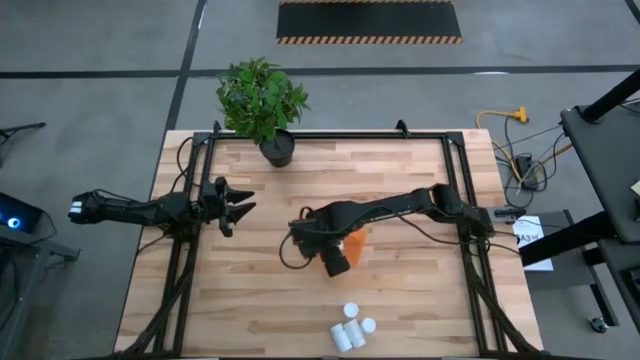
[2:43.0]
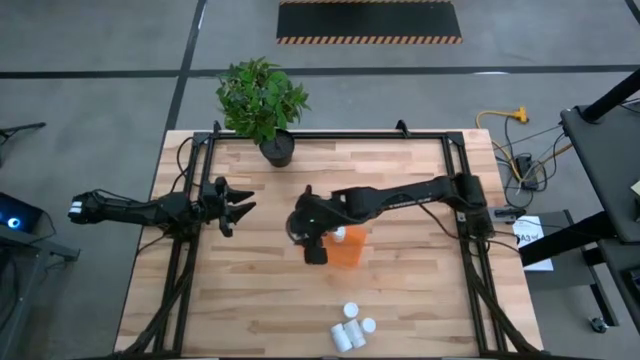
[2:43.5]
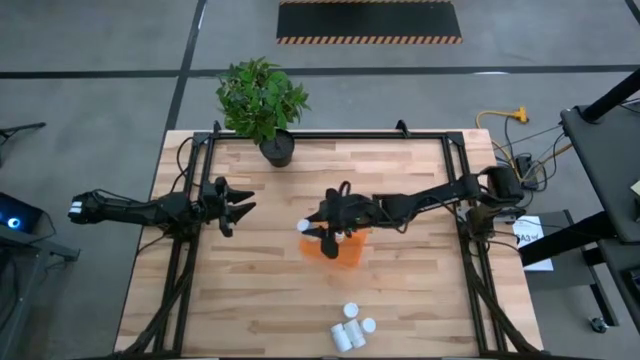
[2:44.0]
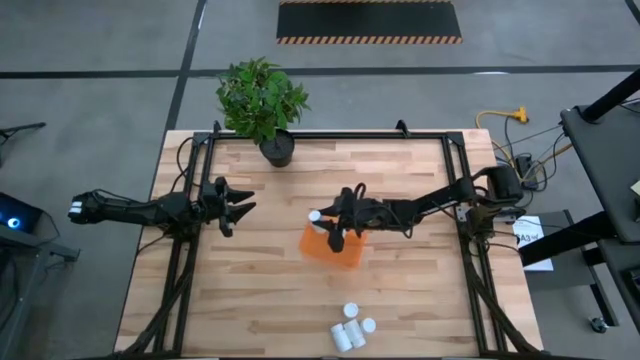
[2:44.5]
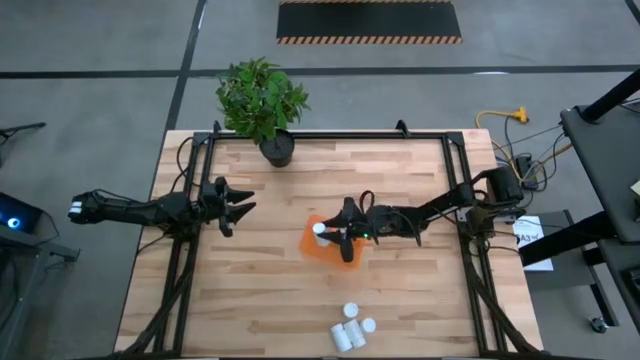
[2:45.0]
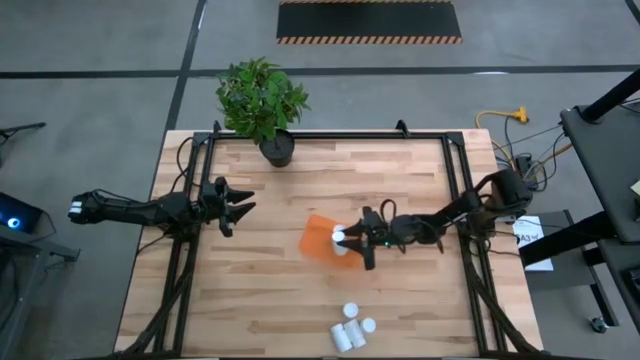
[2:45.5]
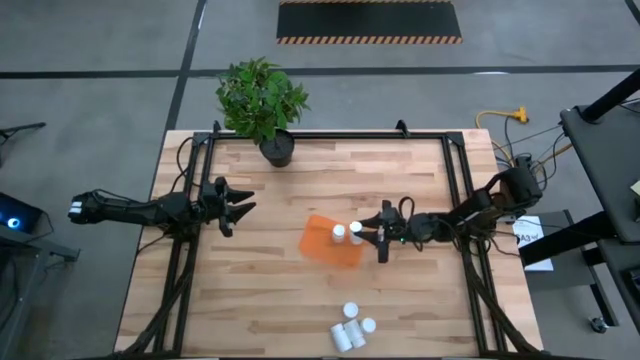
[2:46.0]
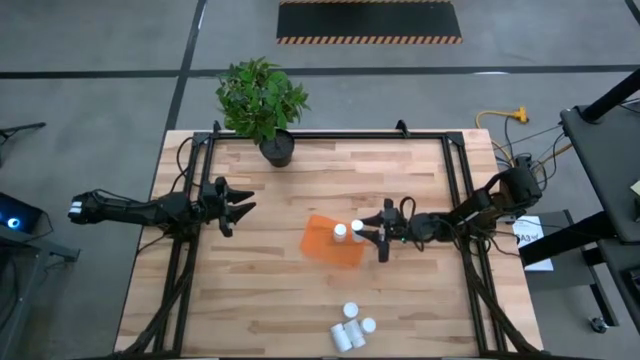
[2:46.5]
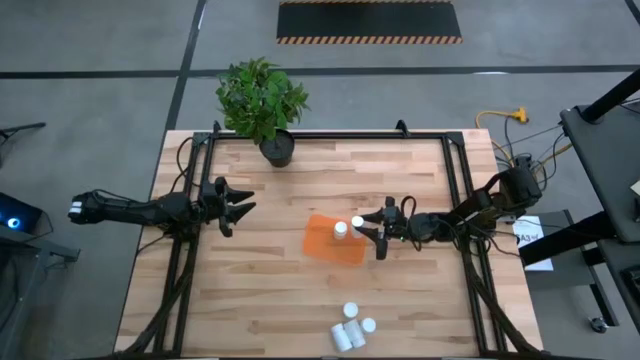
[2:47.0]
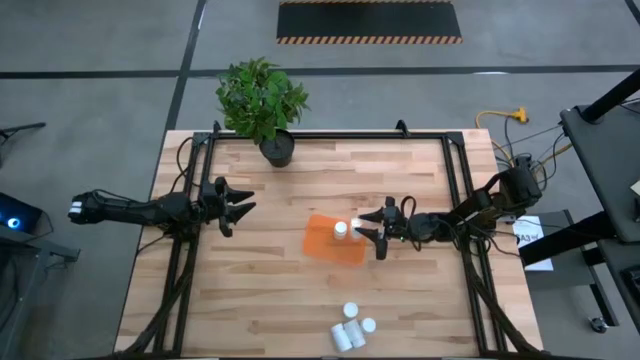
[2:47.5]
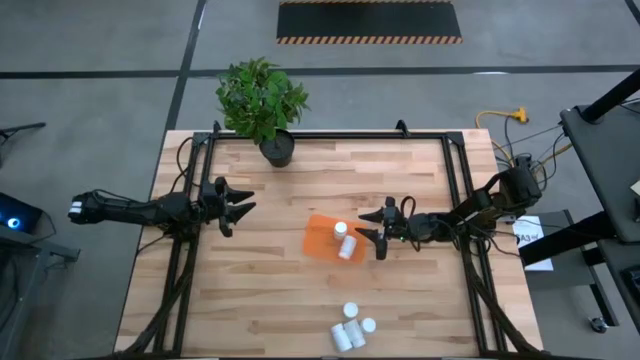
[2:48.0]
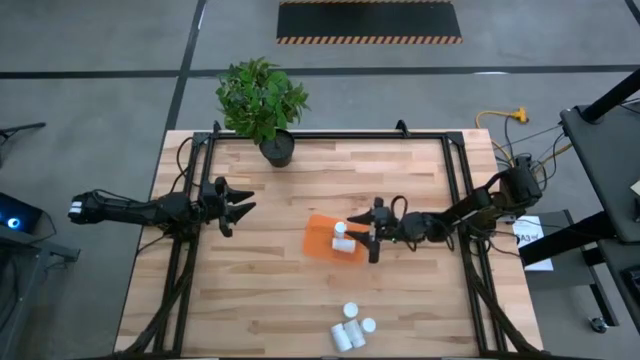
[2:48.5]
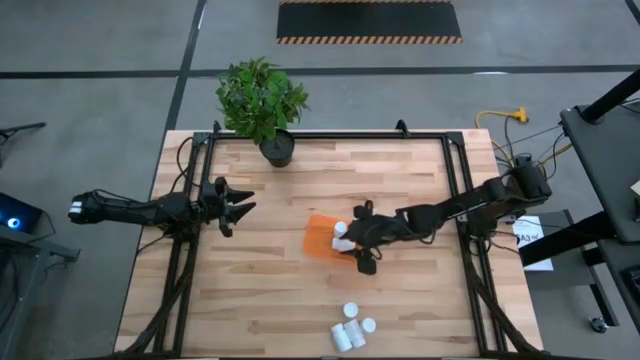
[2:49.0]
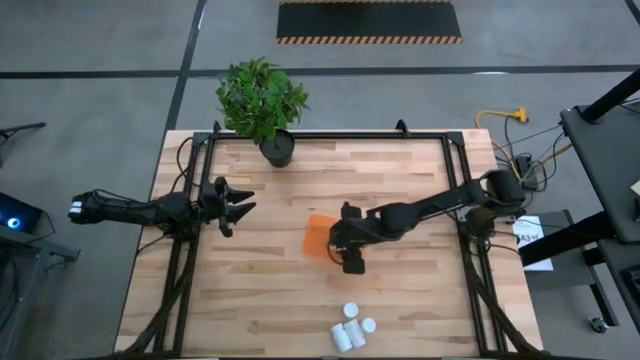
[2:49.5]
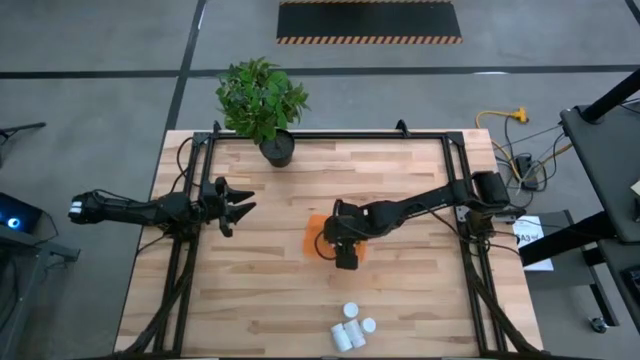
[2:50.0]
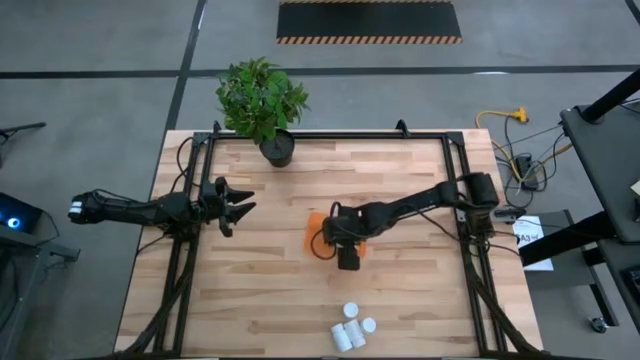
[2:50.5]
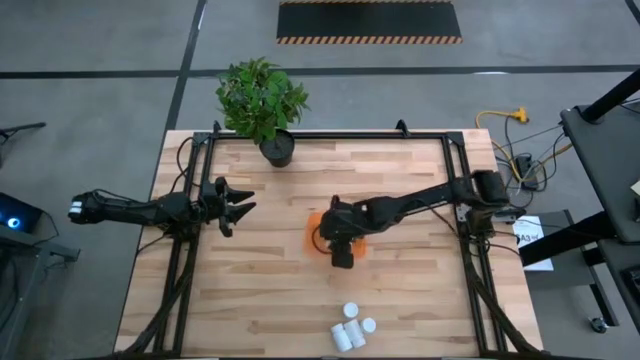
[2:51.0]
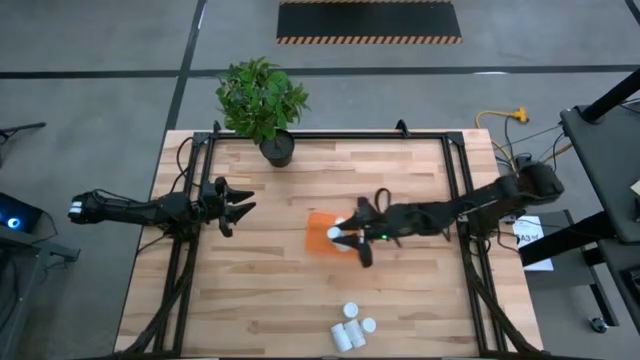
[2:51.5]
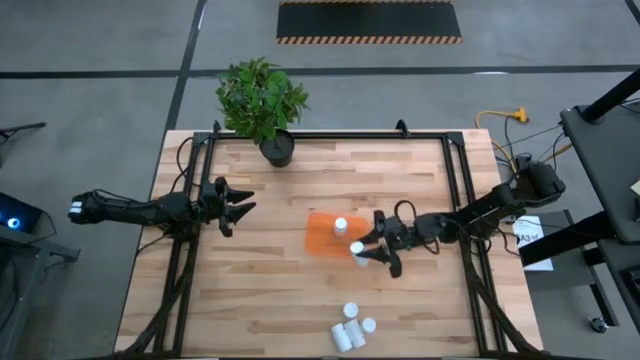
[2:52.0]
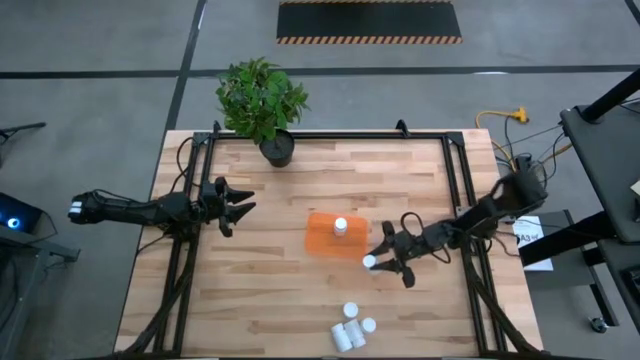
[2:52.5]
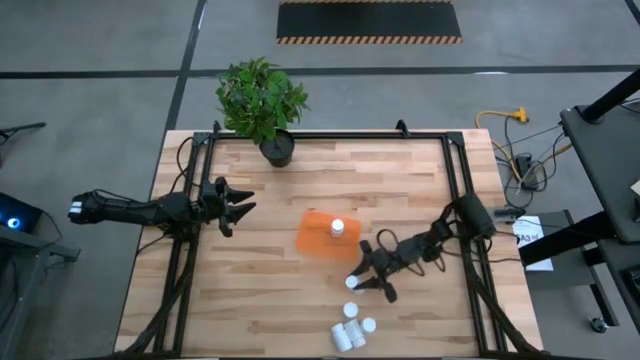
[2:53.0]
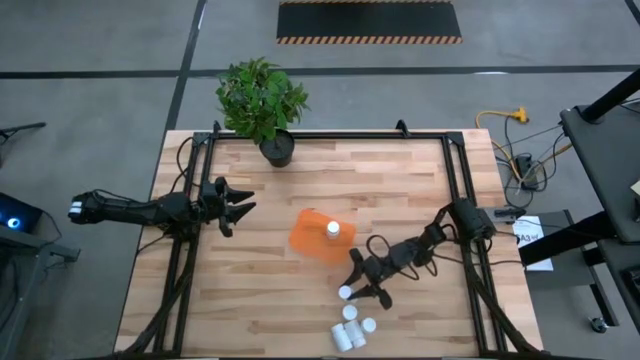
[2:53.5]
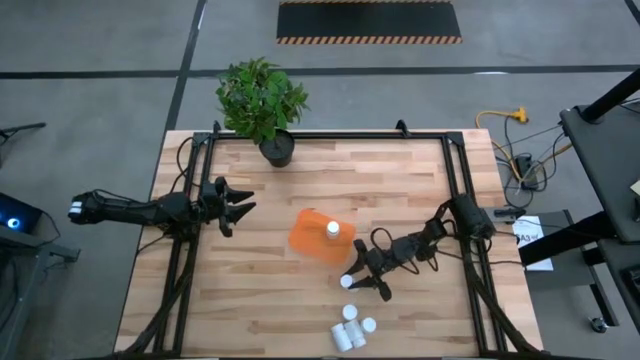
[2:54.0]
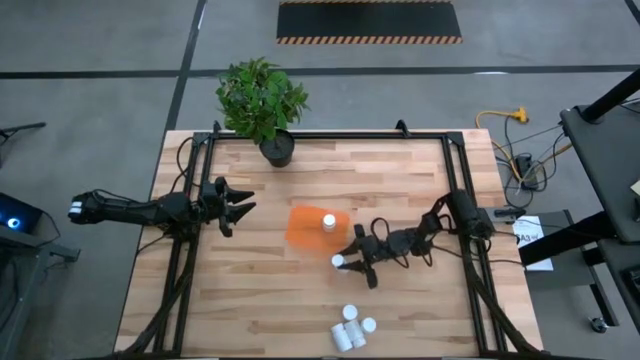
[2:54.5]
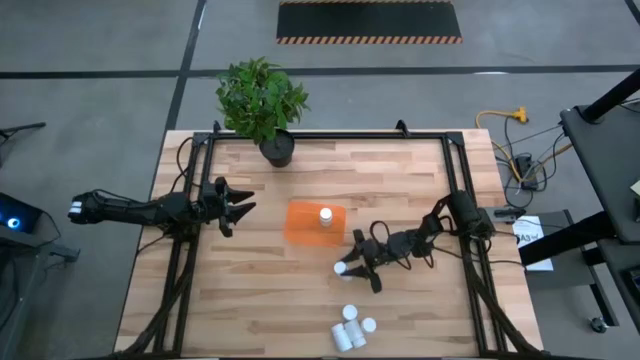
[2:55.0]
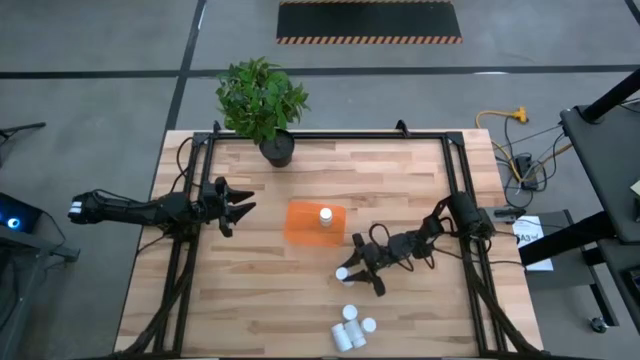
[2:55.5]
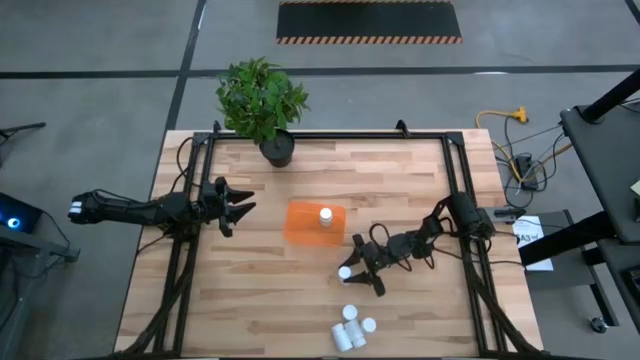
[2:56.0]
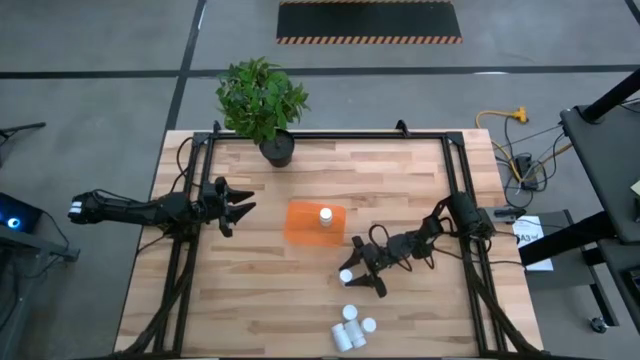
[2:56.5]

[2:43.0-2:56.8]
Task: Pick and place pill bottles into a basket
Put the white pill bottle into the orange container

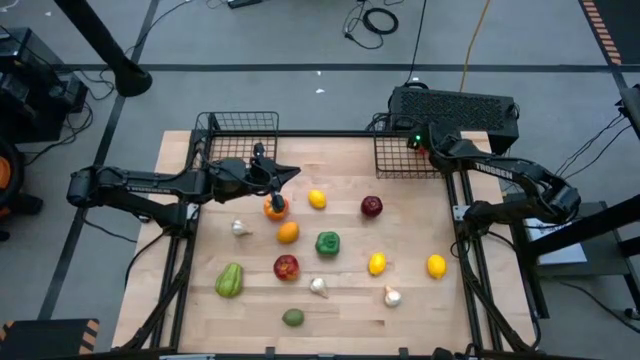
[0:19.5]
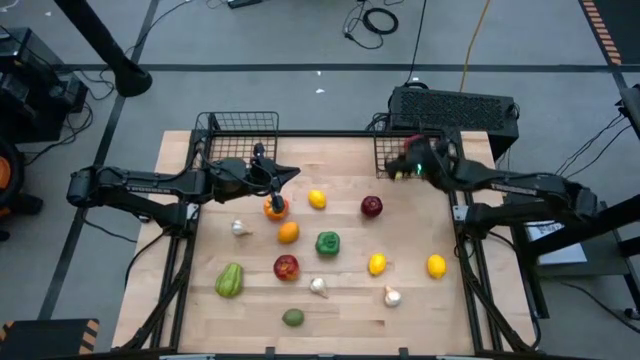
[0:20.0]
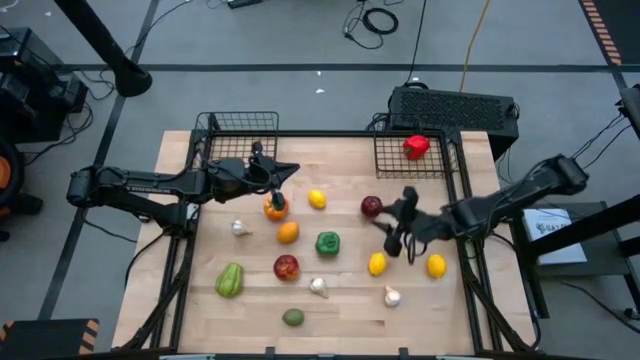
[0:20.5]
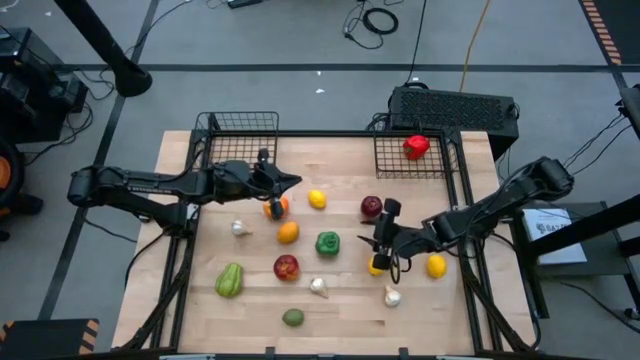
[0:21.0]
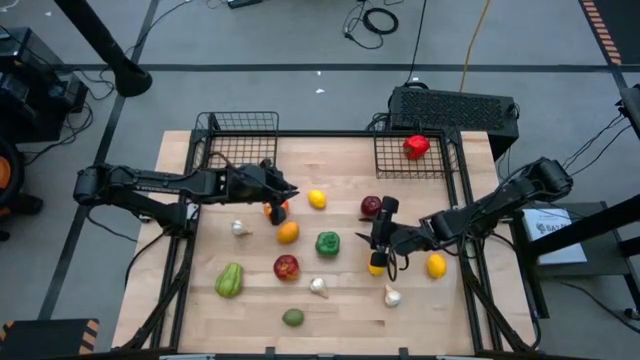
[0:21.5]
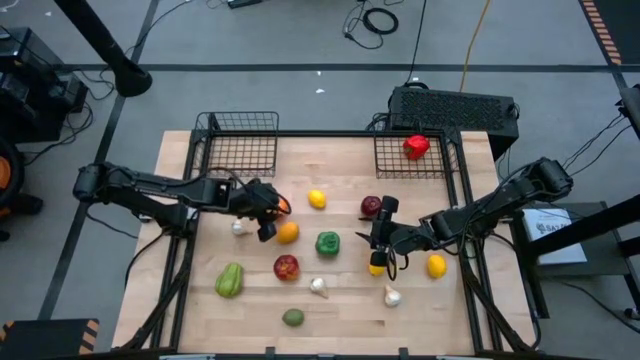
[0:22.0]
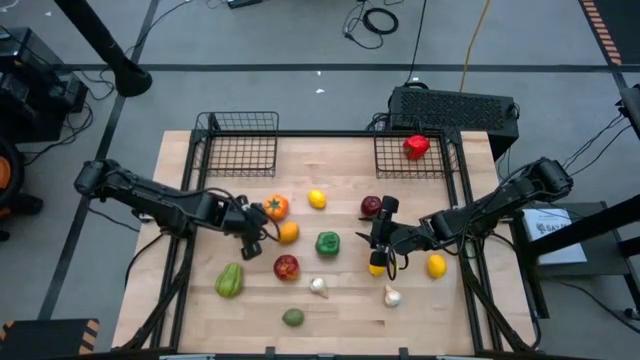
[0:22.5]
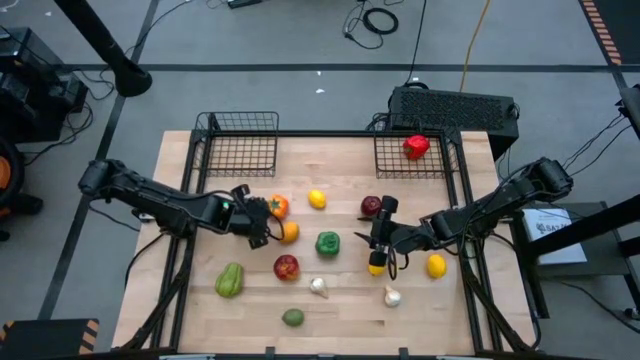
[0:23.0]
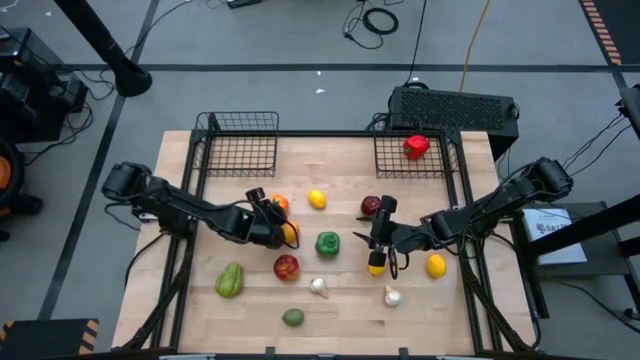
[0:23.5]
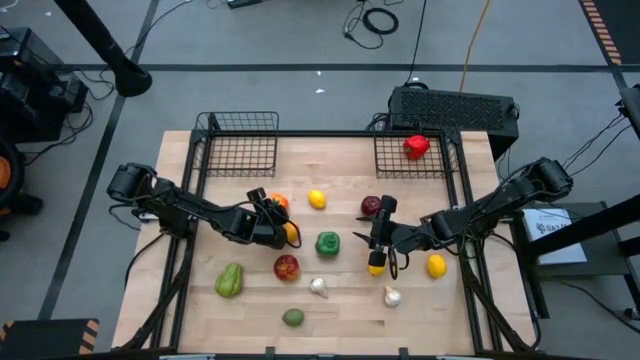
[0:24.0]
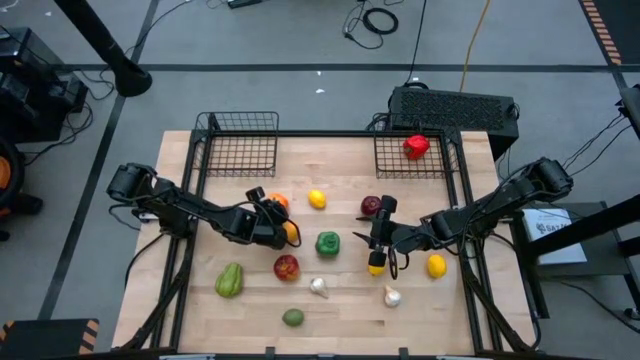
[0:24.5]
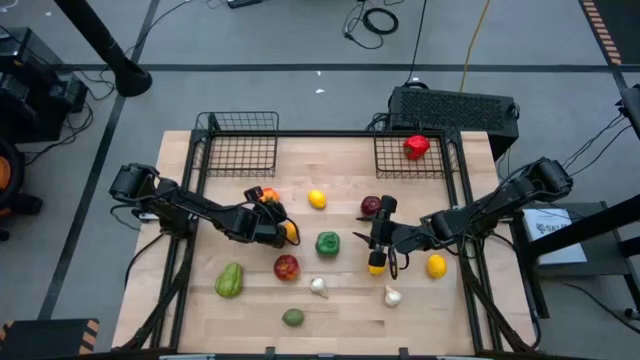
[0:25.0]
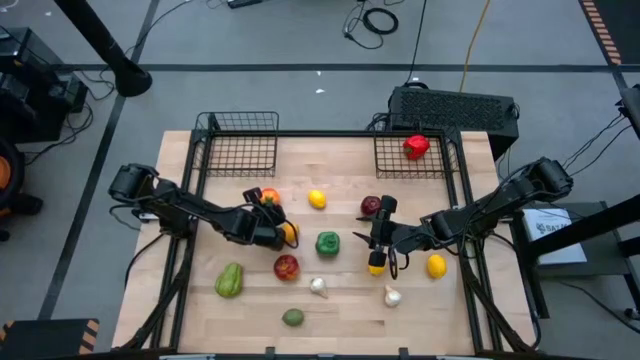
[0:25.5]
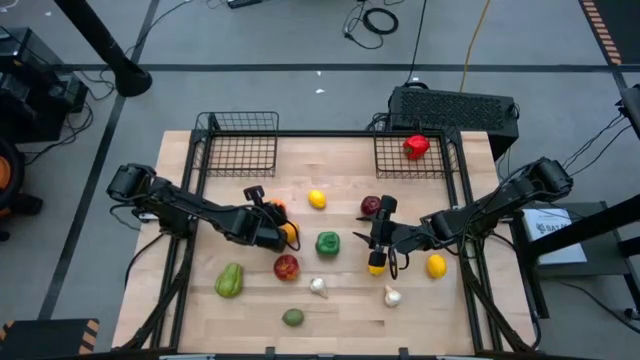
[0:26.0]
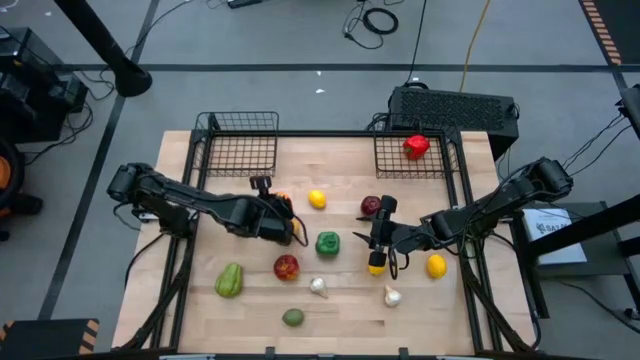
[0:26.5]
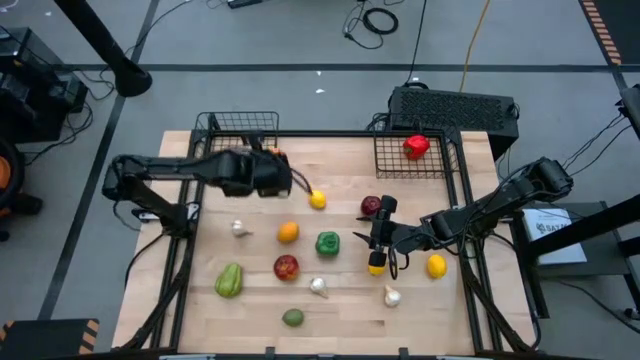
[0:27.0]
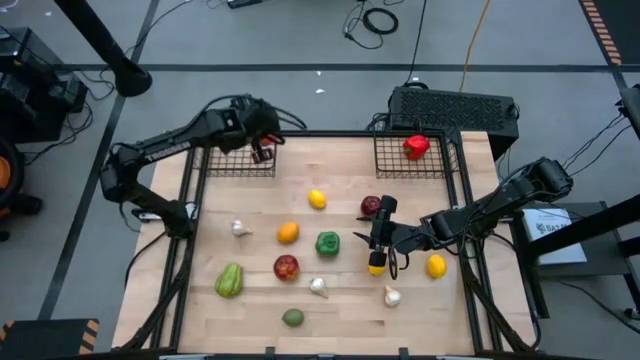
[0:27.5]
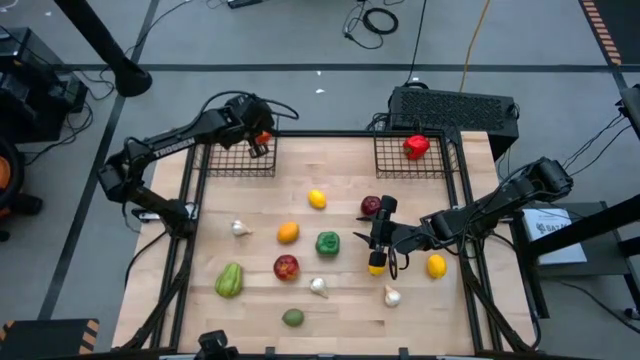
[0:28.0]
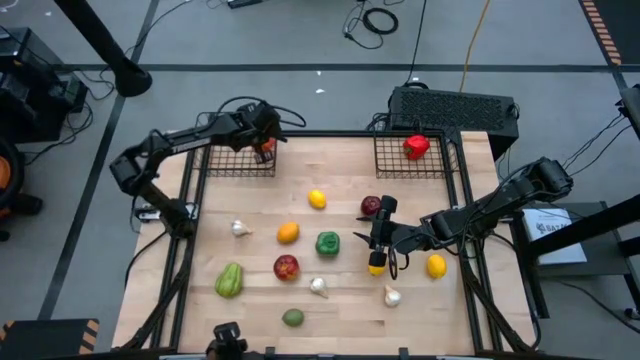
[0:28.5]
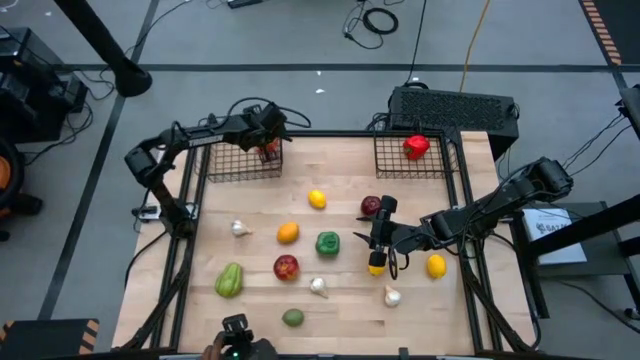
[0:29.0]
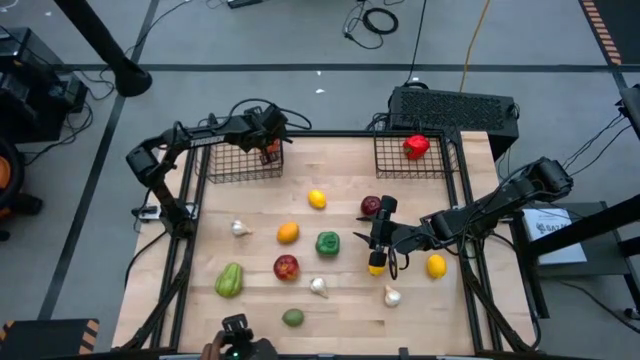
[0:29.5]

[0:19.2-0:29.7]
Task: Sort produce into baskets
Put the orange tomato in the left basket
